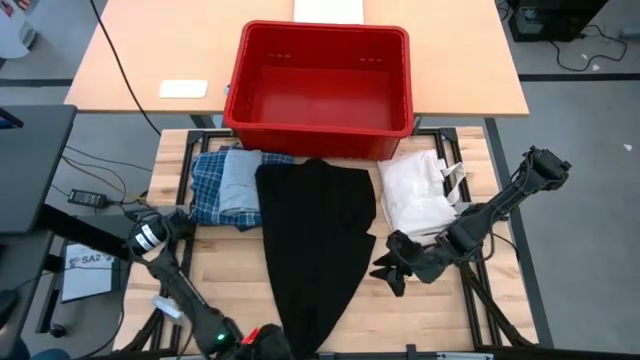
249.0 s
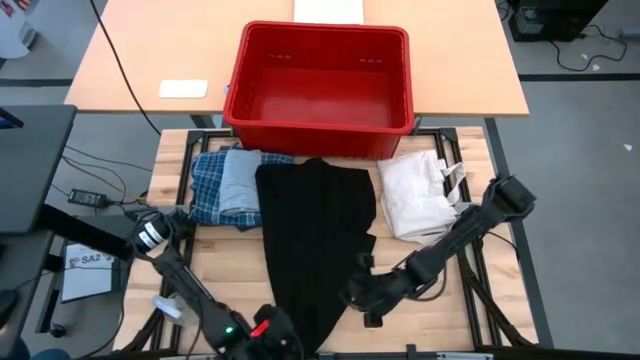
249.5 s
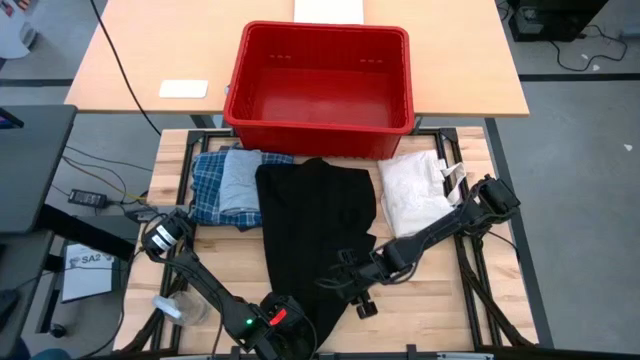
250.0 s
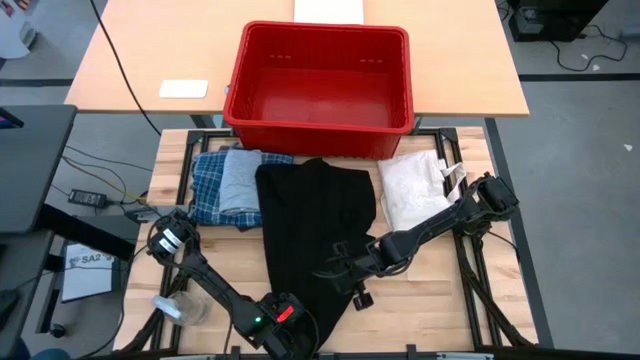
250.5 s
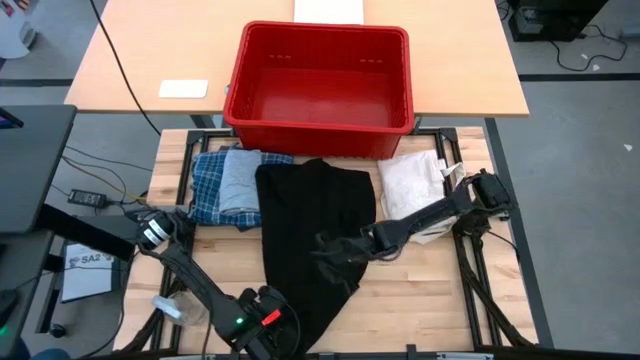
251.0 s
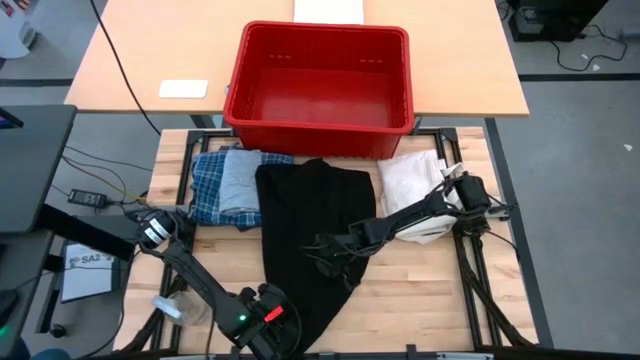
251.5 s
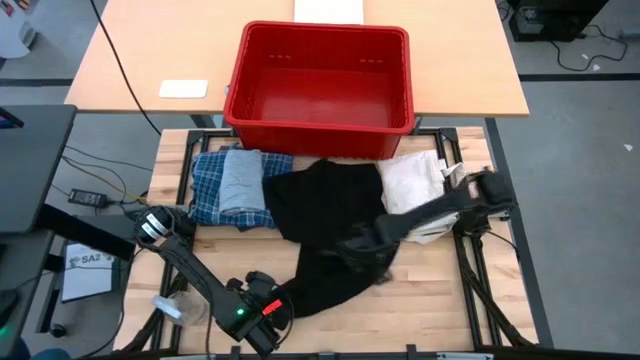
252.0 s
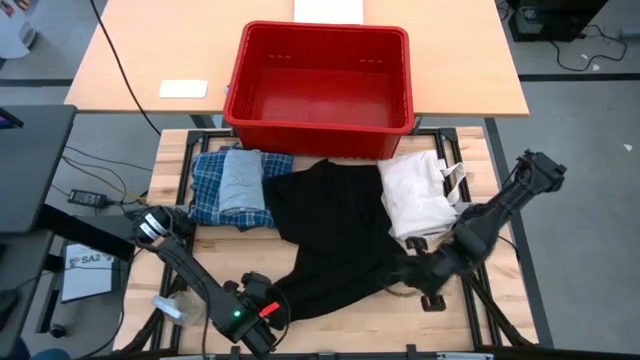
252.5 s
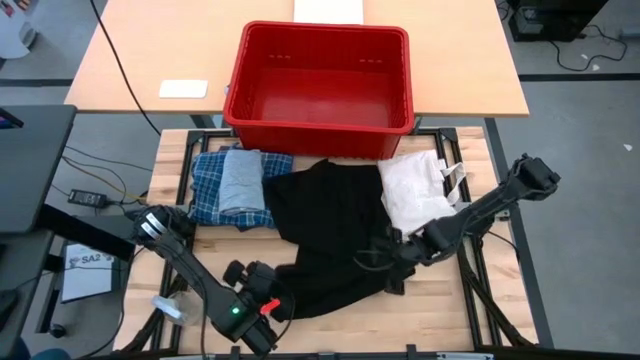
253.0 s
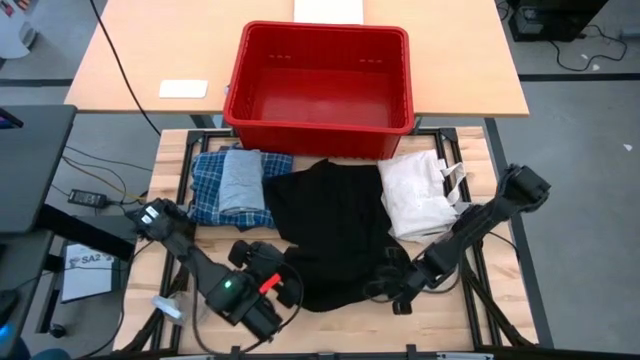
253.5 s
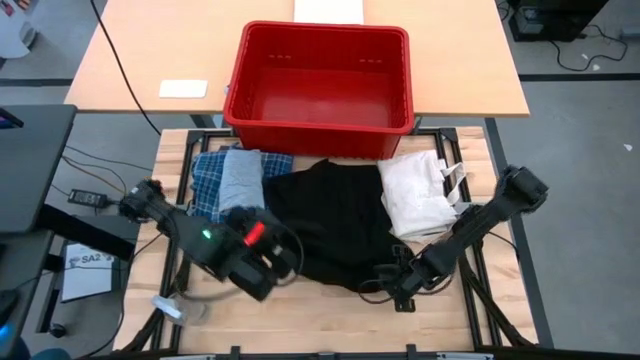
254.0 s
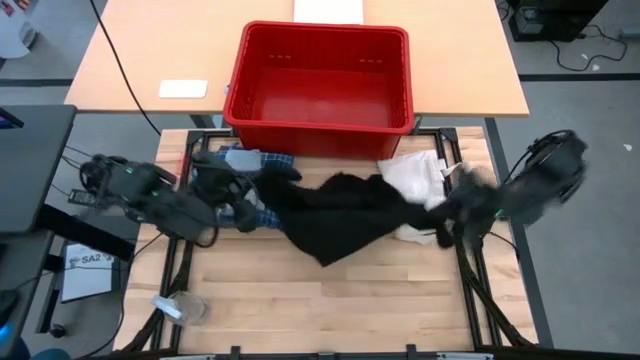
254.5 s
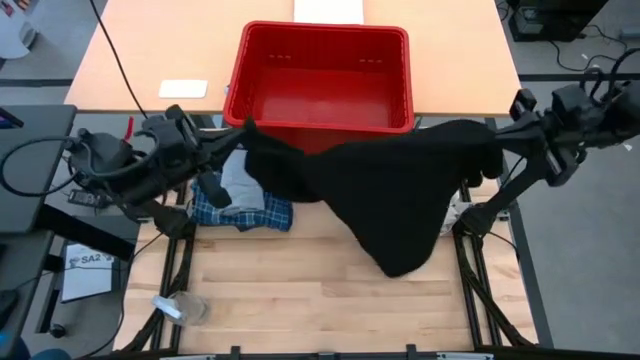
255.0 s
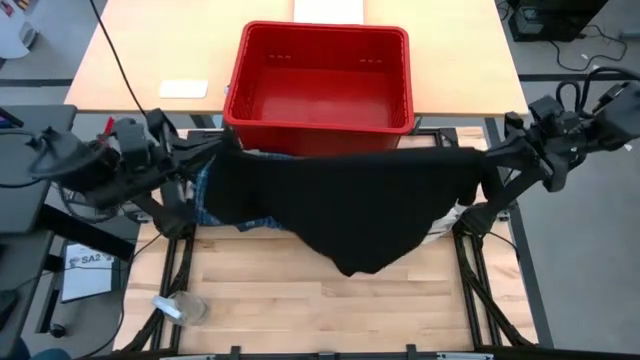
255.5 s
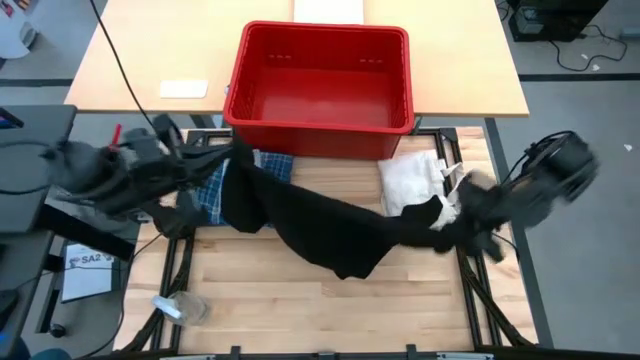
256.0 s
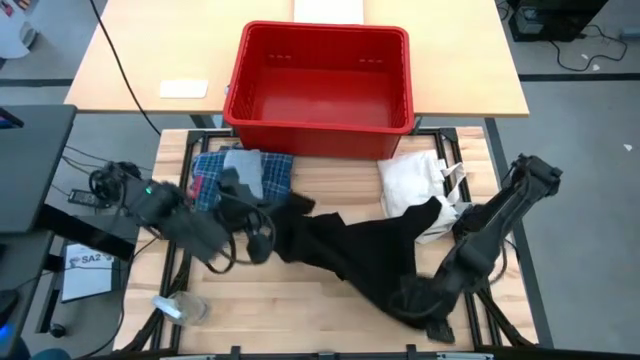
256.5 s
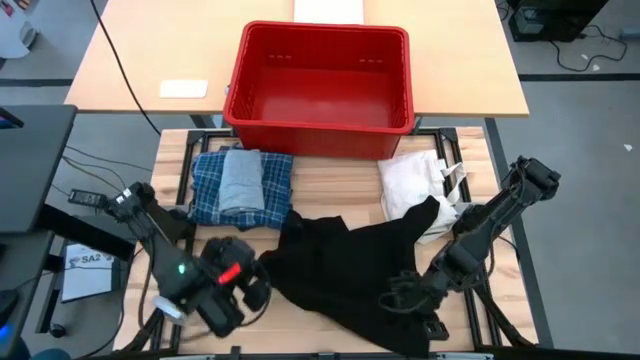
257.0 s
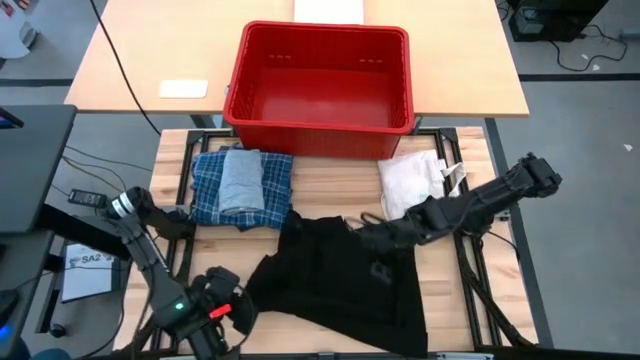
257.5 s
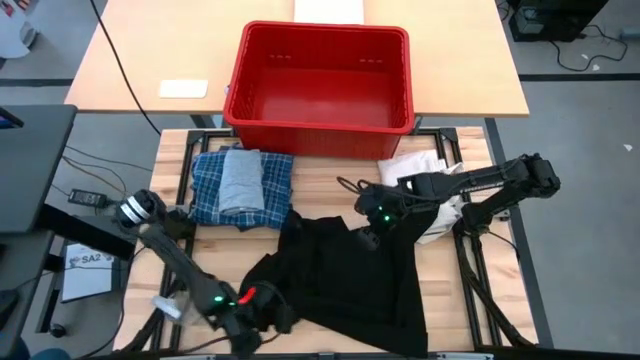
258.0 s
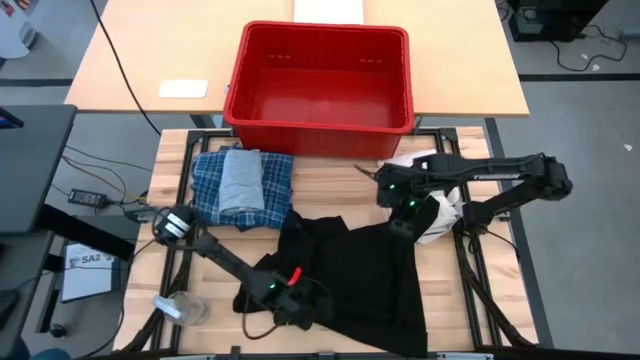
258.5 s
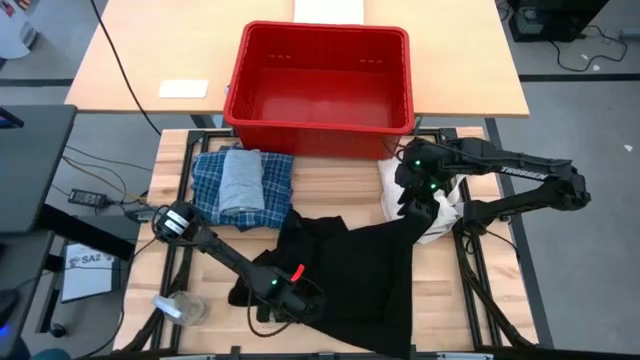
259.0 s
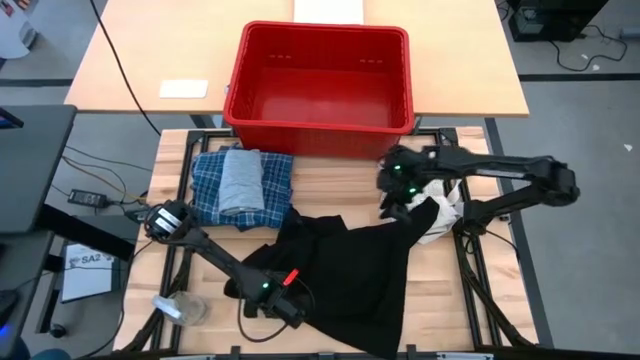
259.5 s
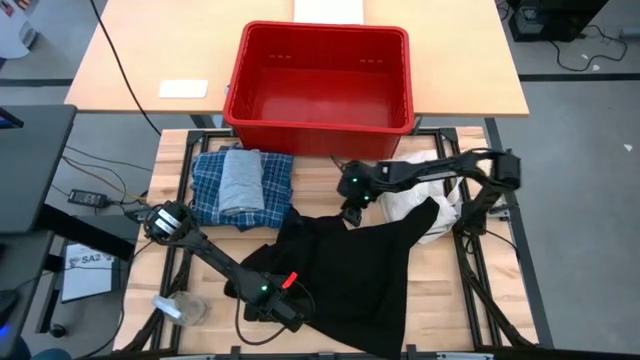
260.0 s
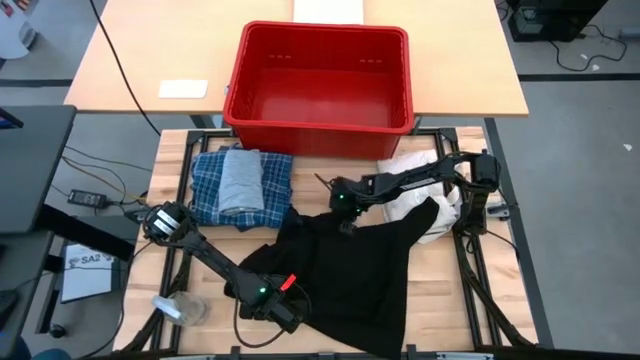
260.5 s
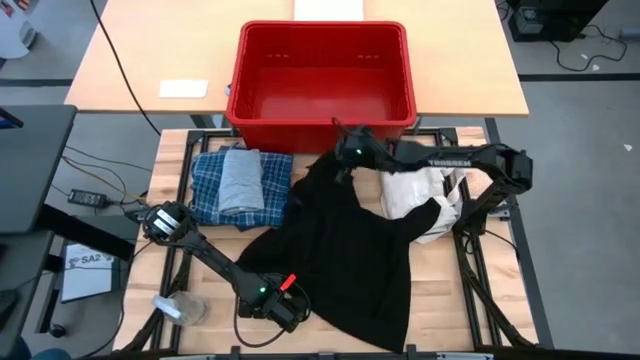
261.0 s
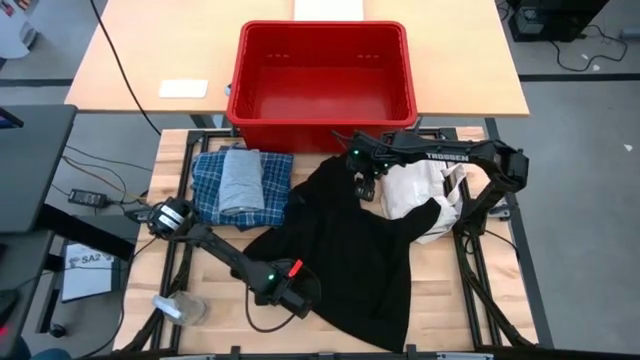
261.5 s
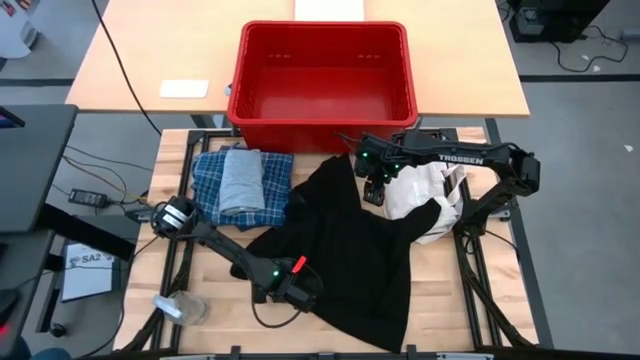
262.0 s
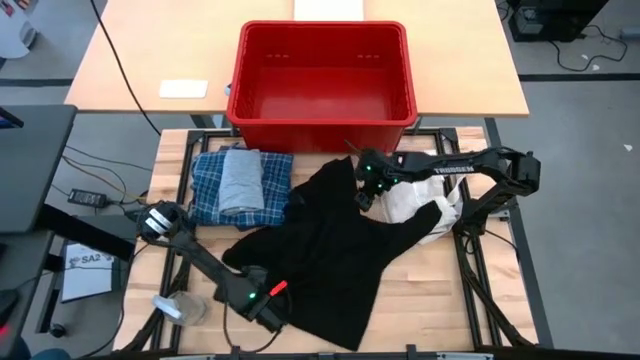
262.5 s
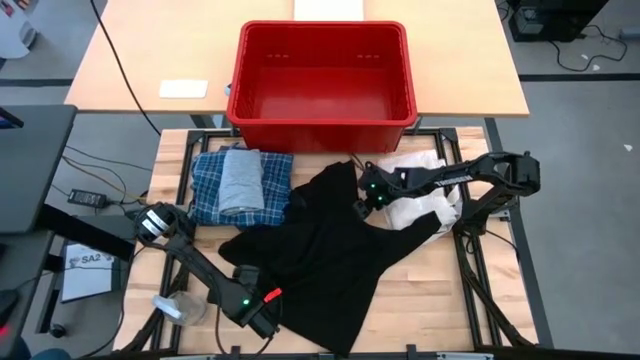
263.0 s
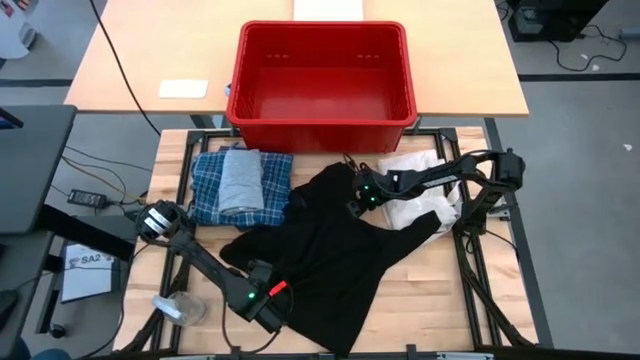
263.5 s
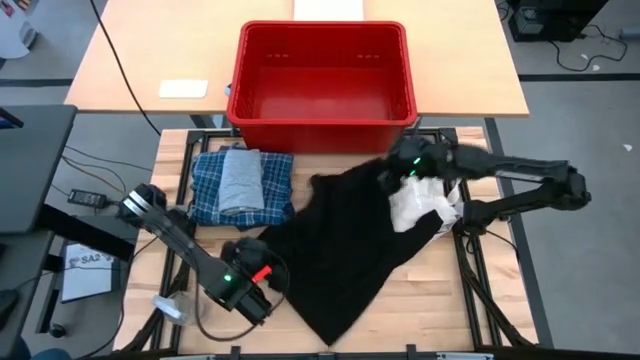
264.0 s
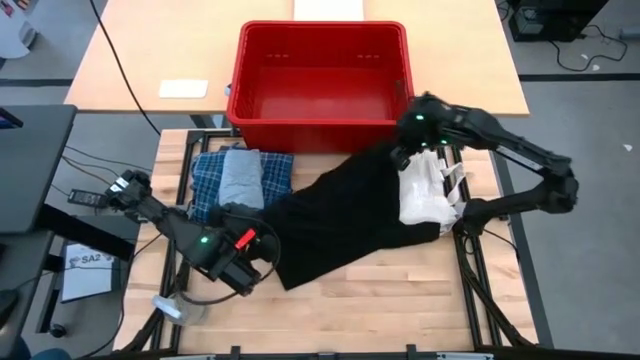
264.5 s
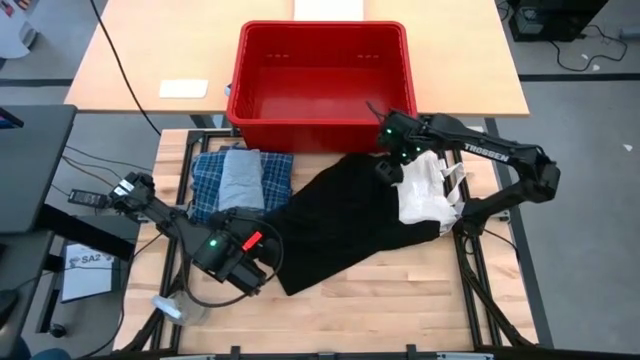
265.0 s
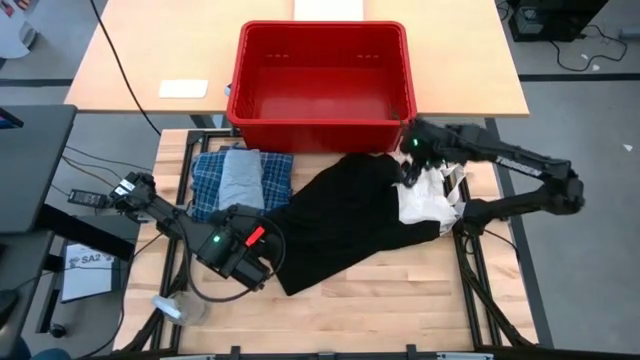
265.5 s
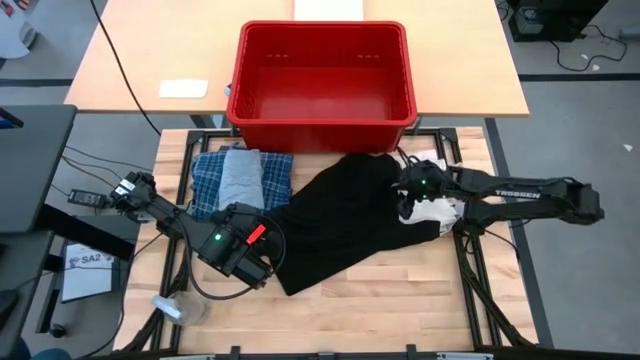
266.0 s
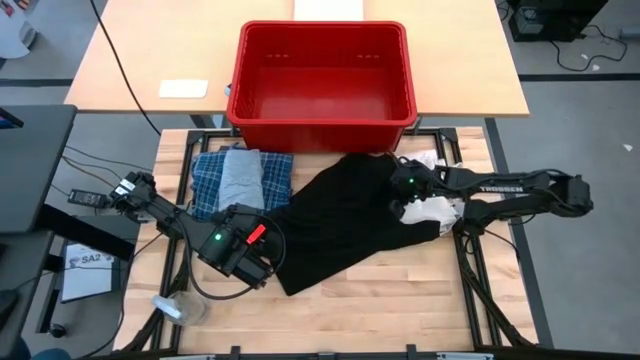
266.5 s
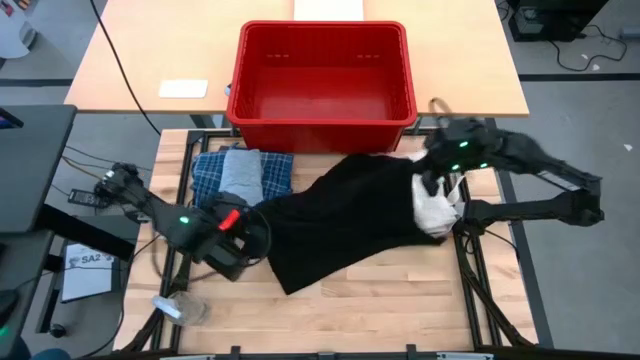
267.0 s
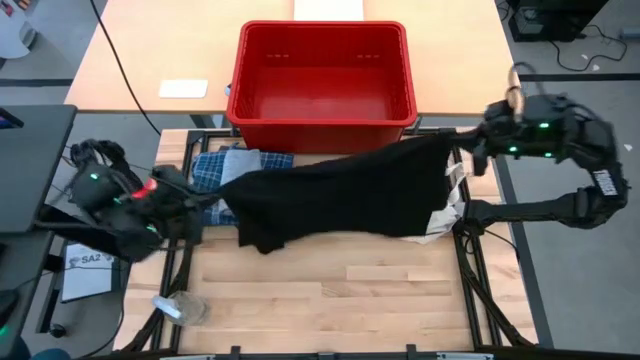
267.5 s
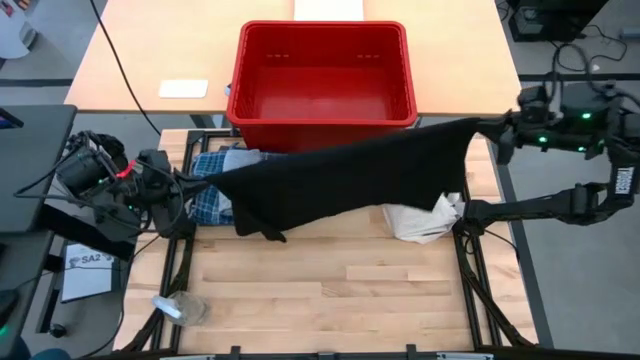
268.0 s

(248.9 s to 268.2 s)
Task: Fold Laundry from Bin
Fold the black shirt

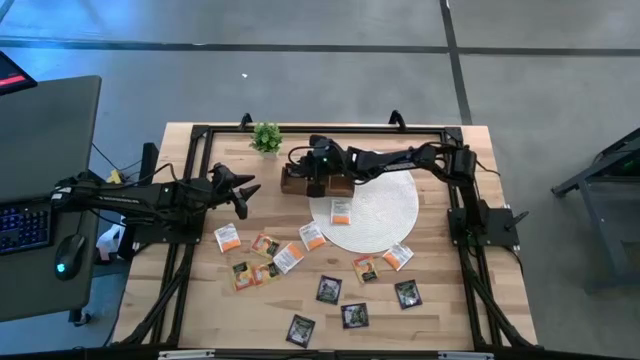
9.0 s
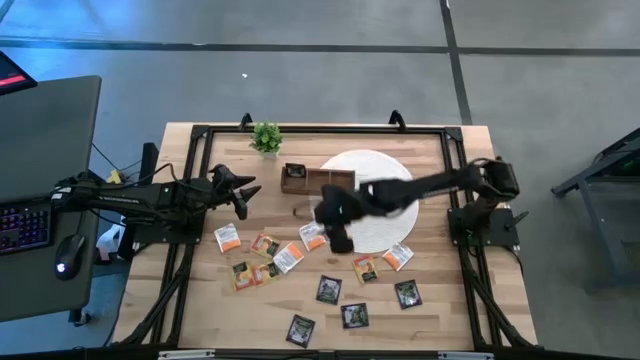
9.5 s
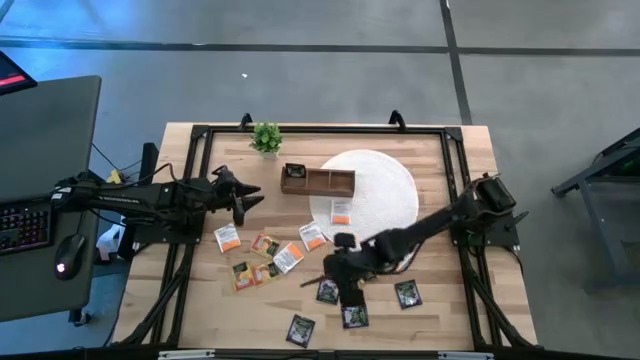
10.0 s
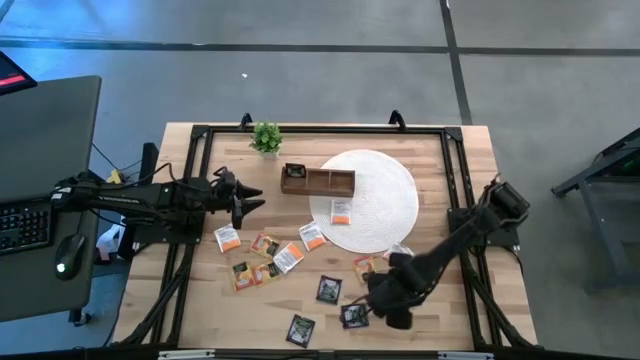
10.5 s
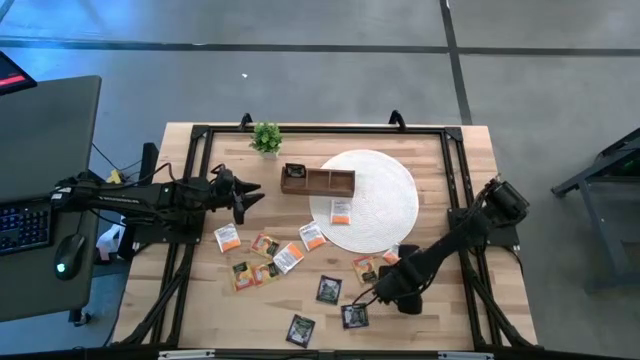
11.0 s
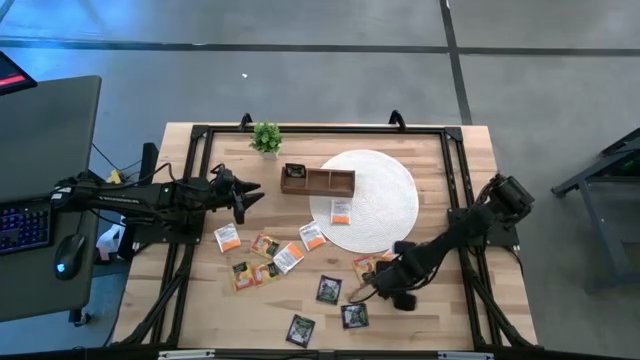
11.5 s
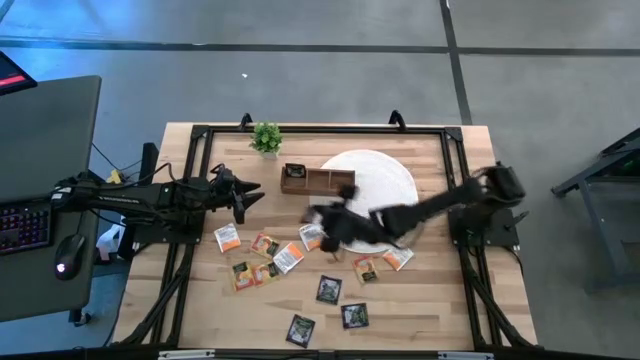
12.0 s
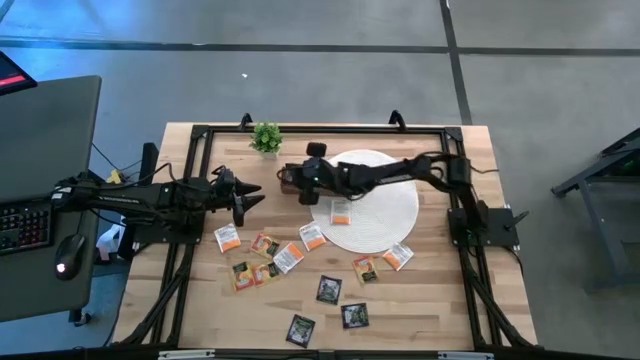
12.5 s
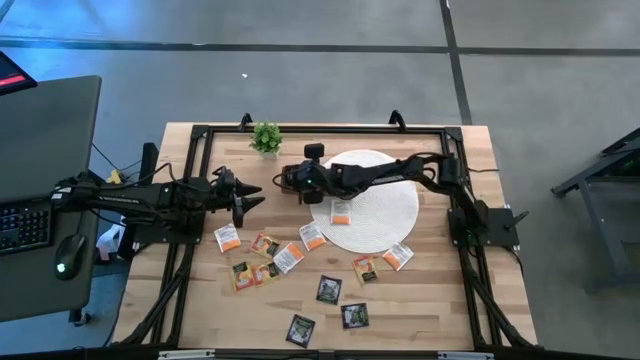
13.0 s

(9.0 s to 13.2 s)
Task: Pick & Place Tea
Put the violet tea bag into the left section of the wooden organizer
